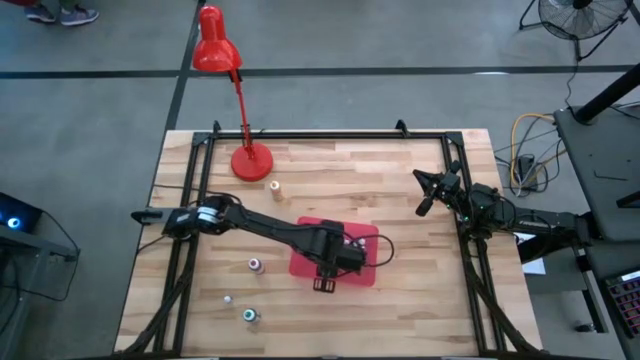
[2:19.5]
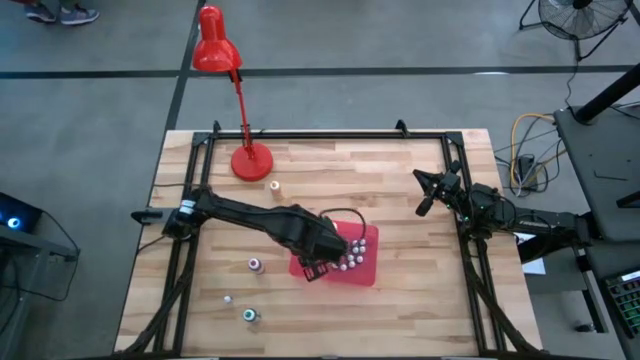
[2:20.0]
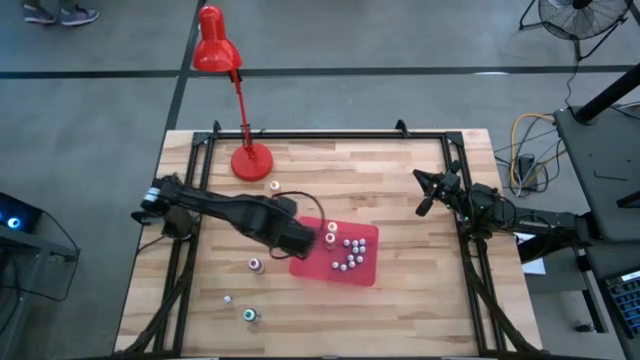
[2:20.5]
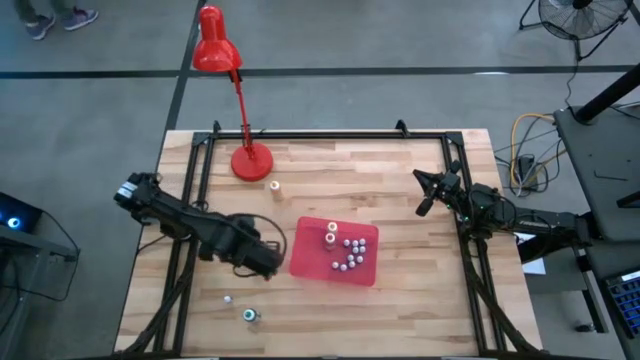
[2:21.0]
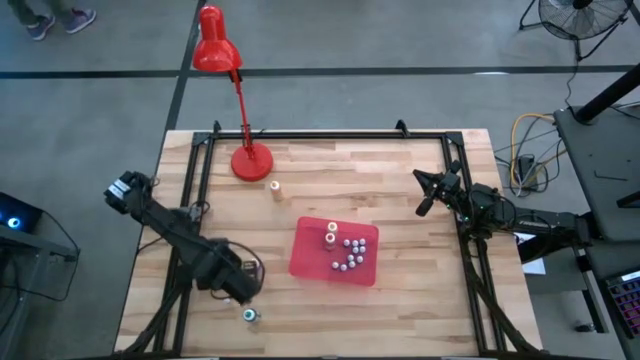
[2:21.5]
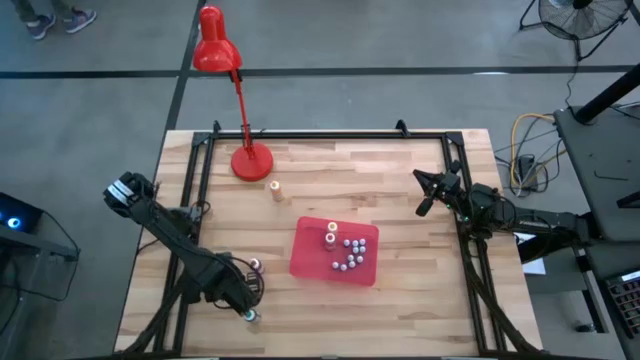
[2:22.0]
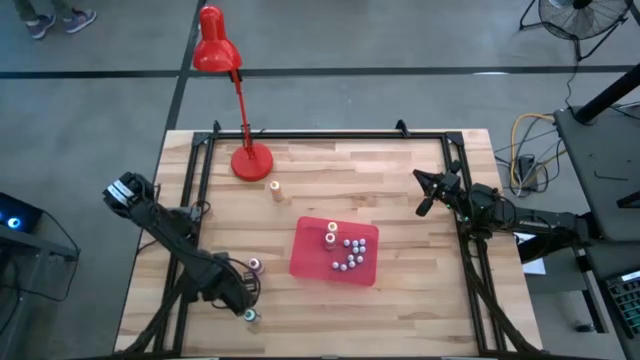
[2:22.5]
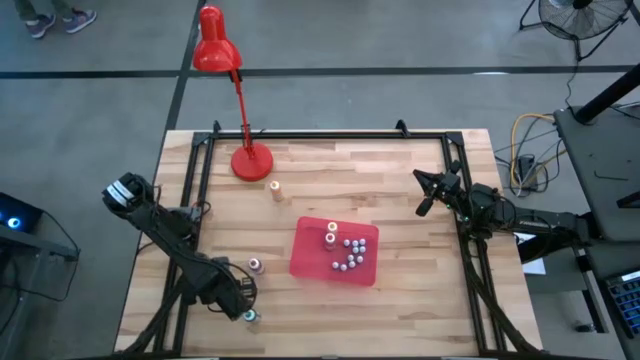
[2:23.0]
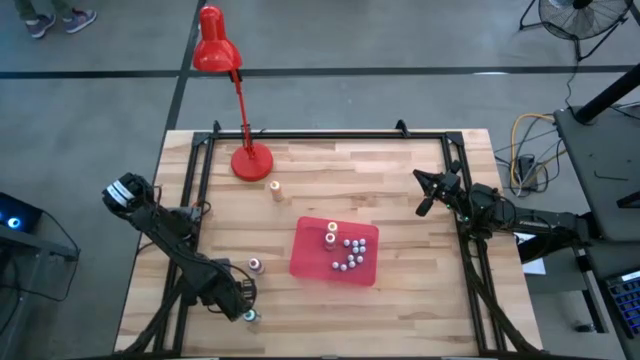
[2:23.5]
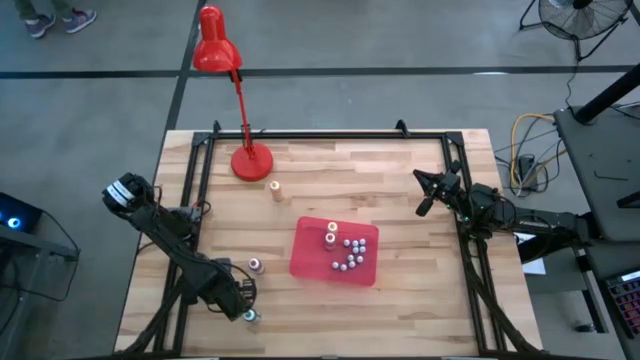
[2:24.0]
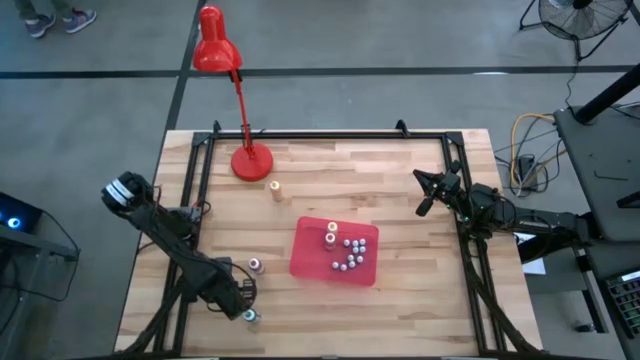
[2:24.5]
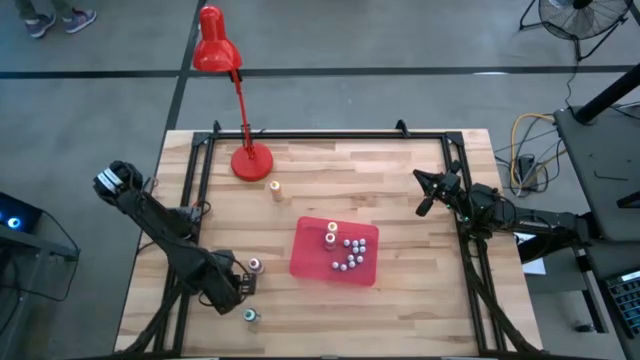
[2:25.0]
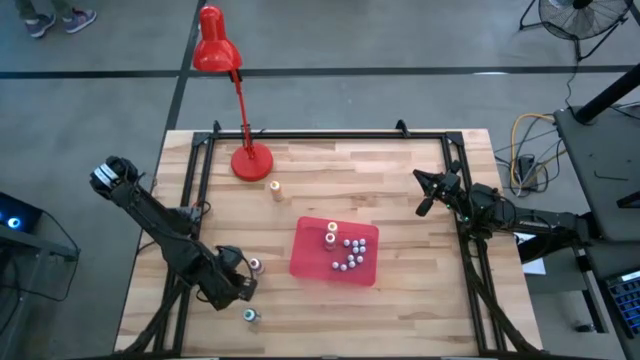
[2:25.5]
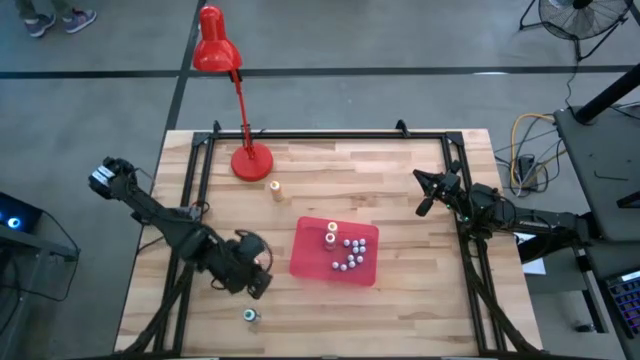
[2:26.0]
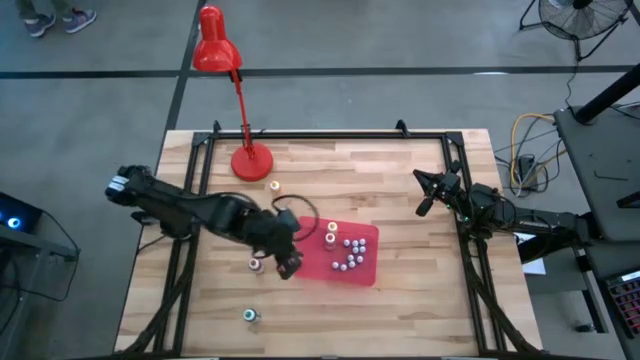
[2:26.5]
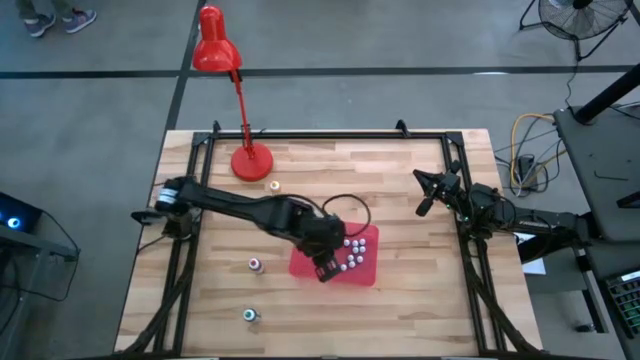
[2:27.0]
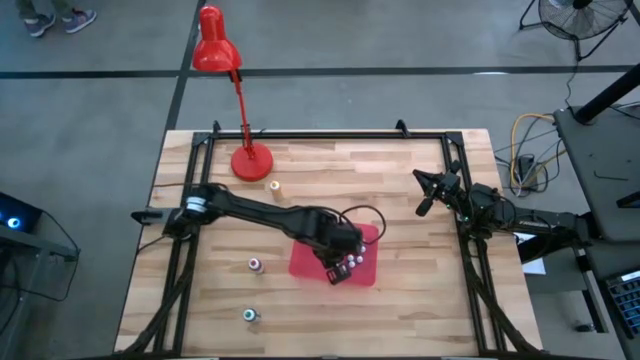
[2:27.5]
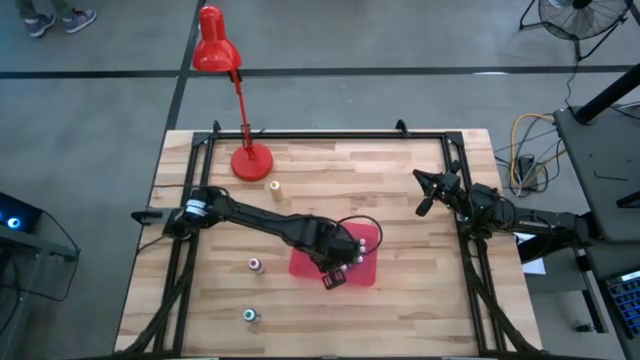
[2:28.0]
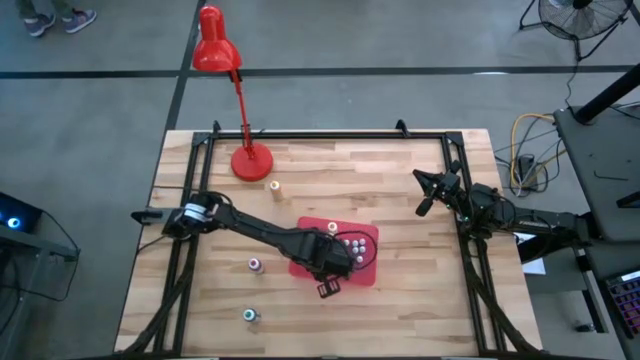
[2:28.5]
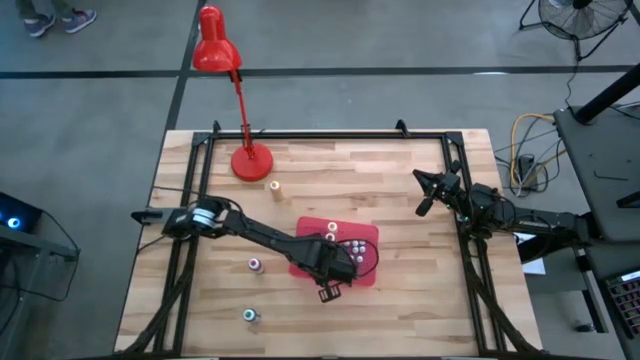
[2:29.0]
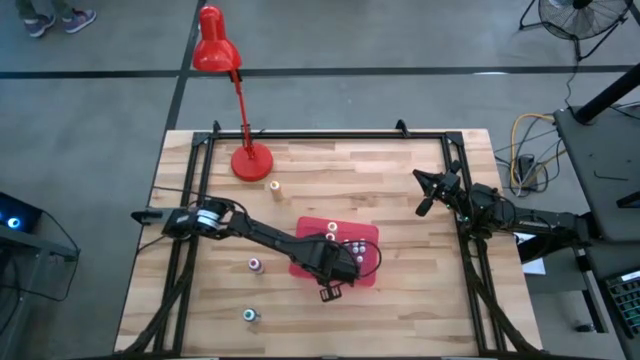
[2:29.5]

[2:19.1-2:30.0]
Task: Pick & Place food coloring
Put the small red food coloring bottle in the red bin

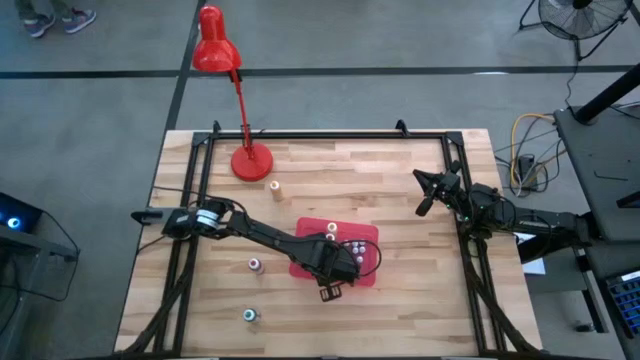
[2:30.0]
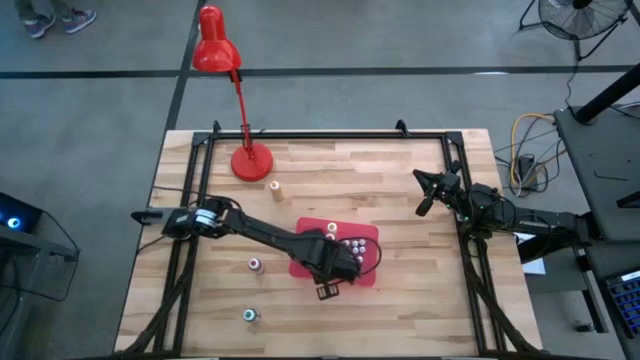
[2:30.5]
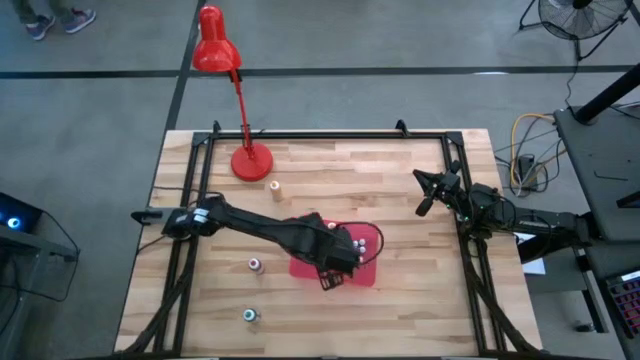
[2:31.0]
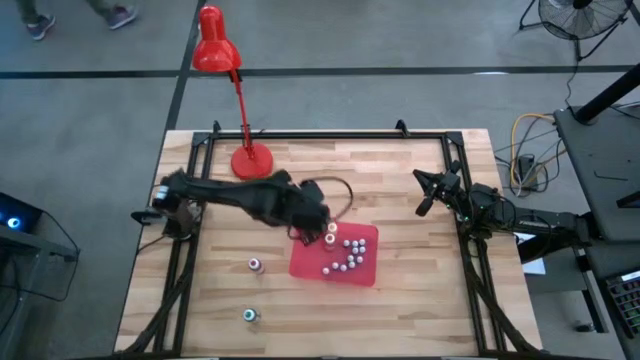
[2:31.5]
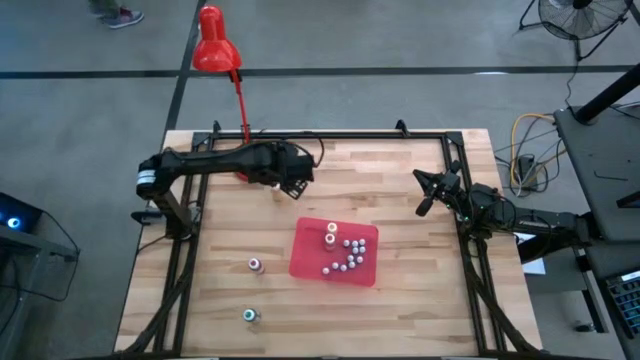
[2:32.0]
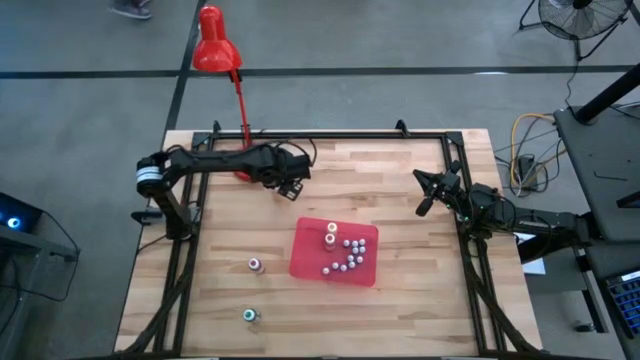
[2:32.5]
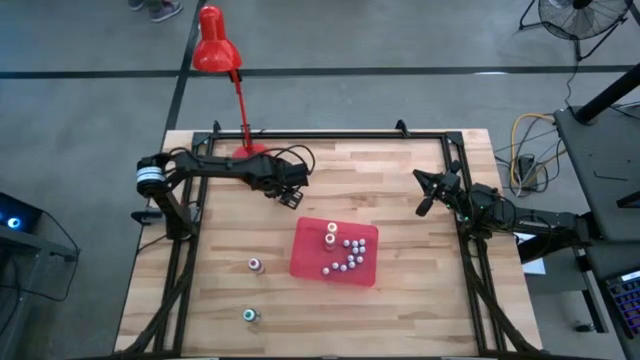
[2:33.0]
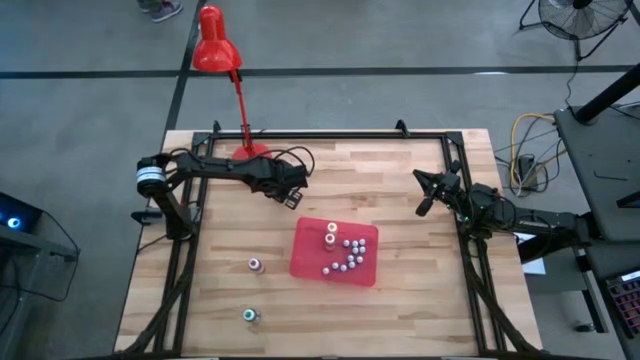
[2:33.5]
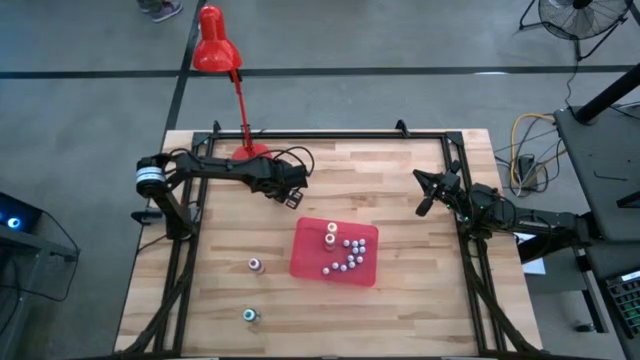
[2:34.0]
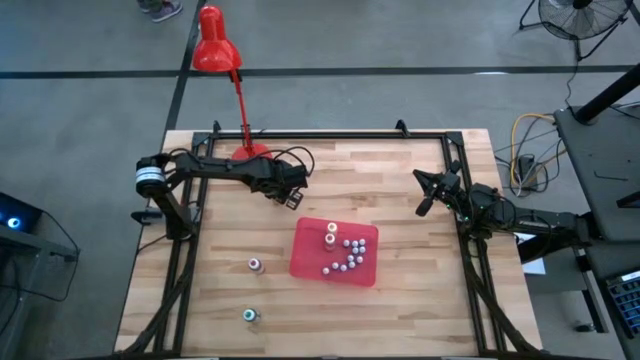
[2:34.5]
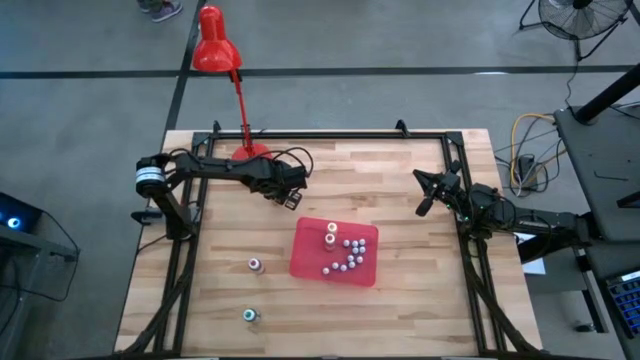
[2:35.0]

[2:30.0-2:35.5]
Put the large yellow food coloring bottle in the red bin

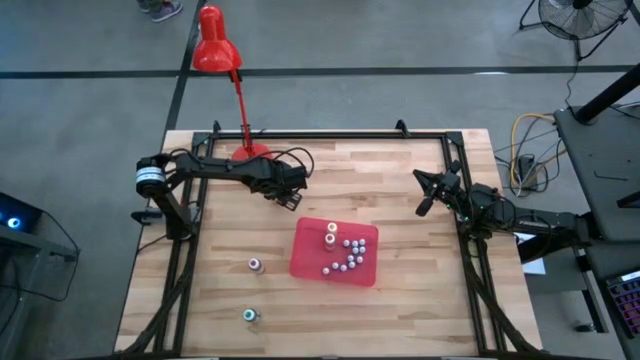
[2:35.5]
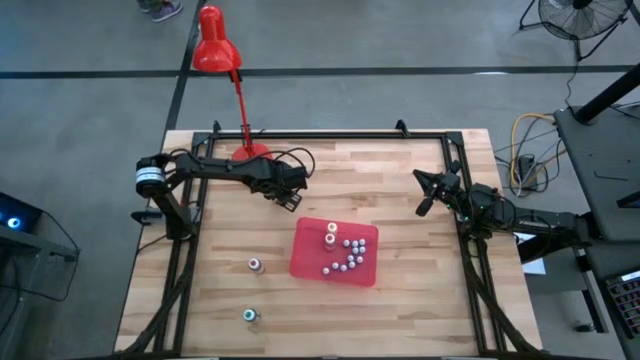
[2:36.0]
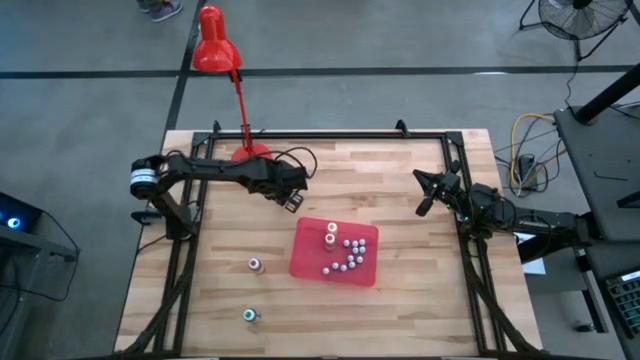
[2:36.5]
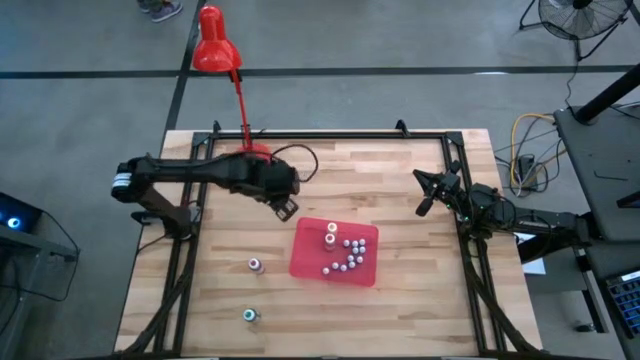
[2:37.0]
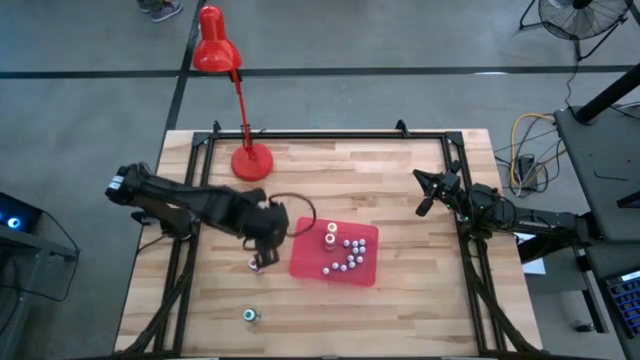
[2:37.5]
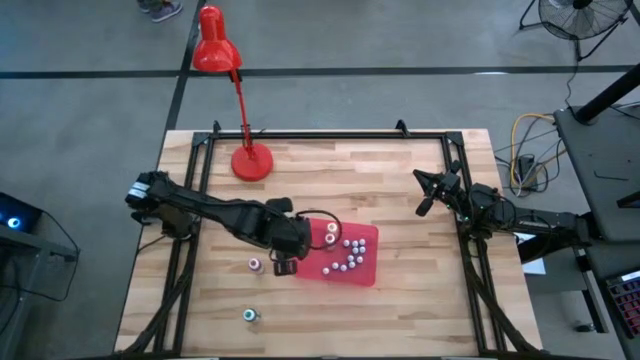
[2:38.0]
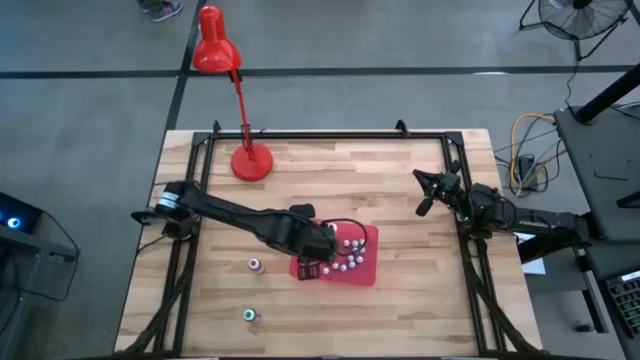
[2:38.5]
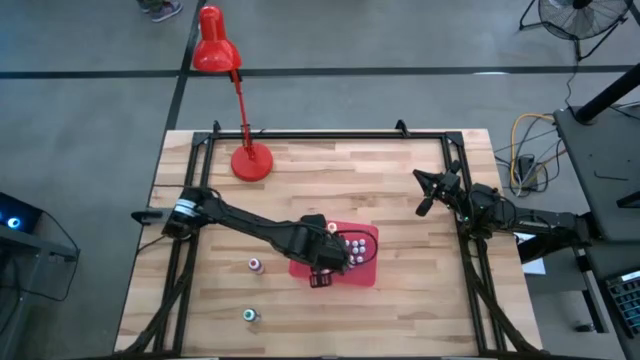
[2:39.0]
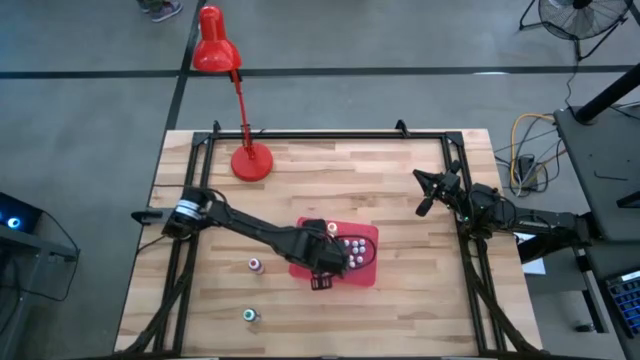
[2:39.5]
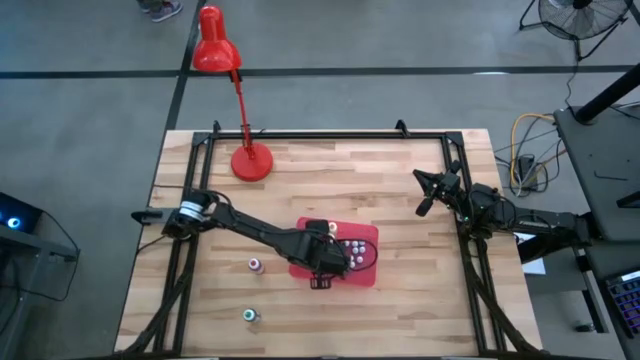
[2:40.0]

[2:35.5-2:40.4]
Put the large yellow food coloring bottle in the red bin

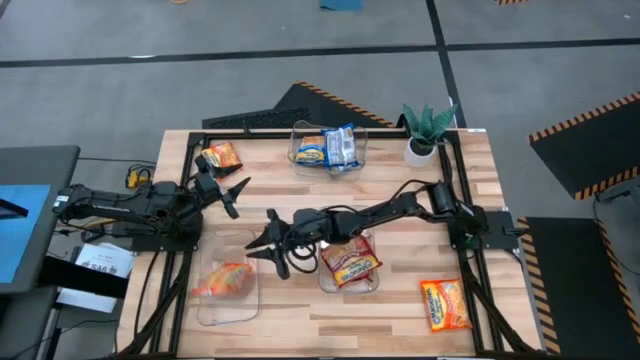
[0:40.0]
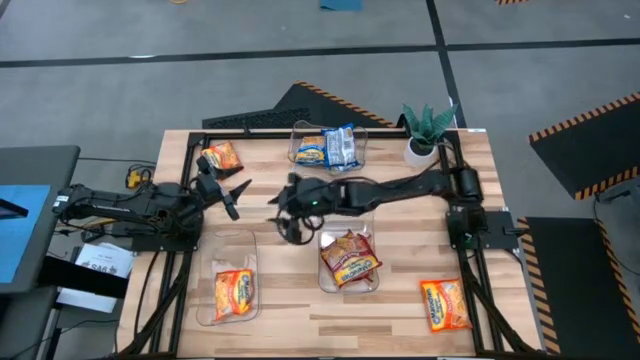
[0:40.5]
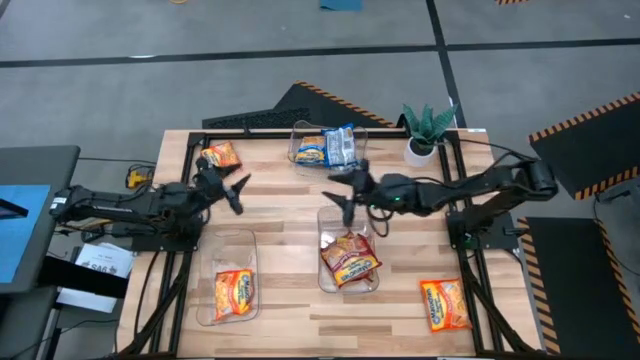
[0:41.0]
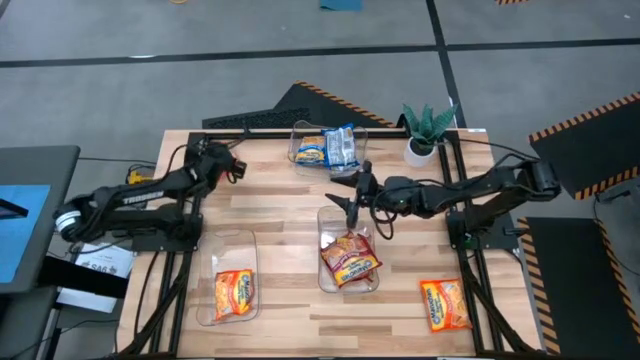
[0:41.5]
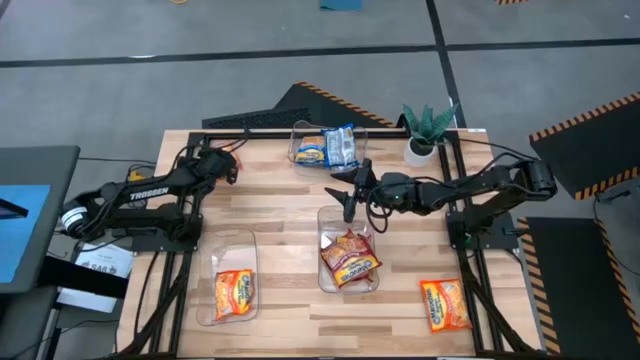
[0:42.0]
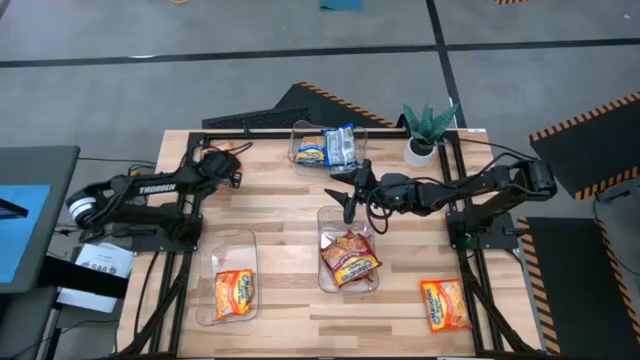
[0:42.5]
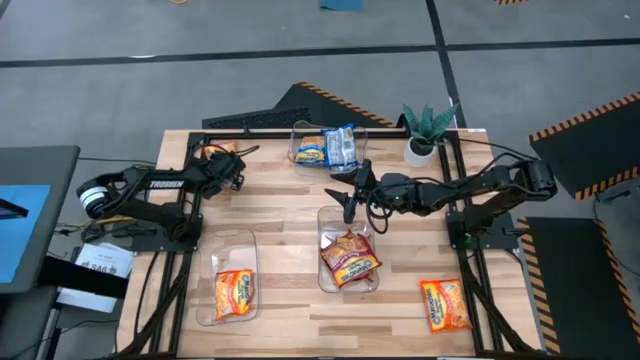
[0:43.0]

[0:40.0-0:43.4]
Task: Sort Maruchan noodles
Put the top orange noodle pack into the left transparent bin
